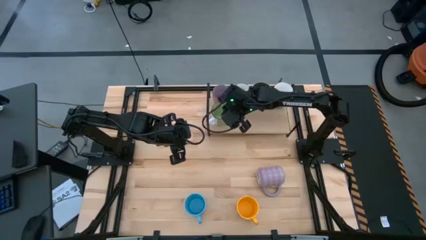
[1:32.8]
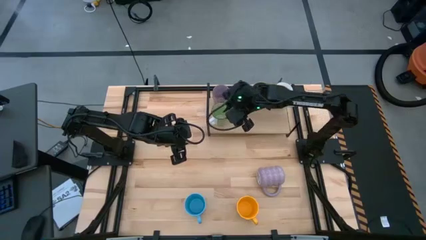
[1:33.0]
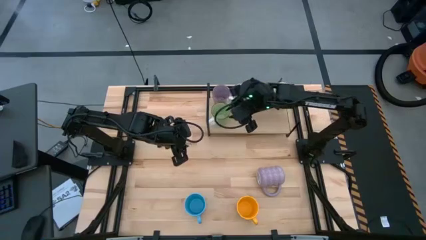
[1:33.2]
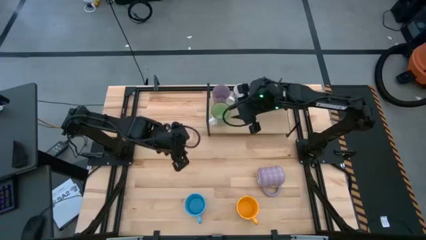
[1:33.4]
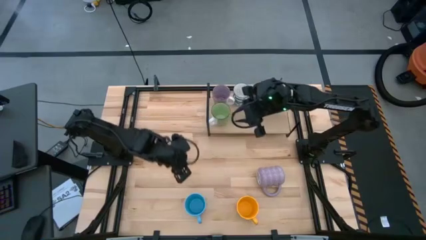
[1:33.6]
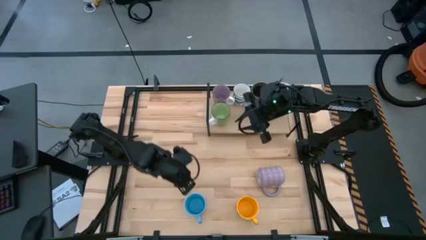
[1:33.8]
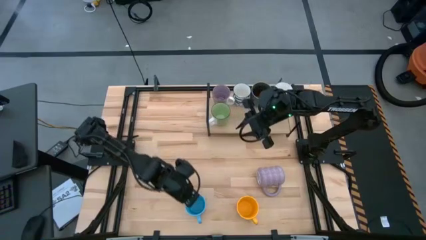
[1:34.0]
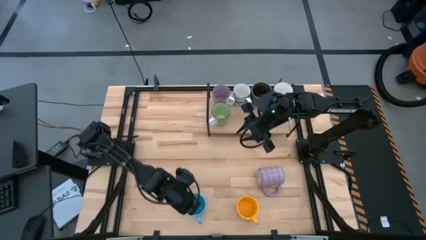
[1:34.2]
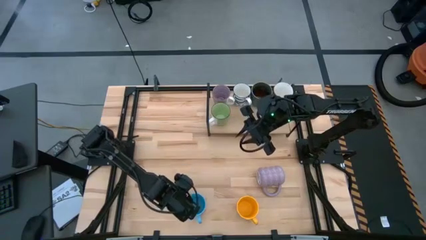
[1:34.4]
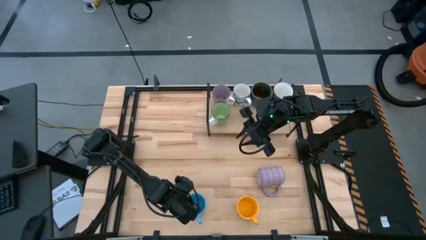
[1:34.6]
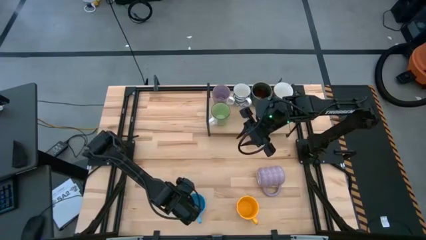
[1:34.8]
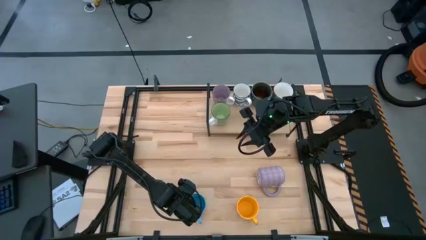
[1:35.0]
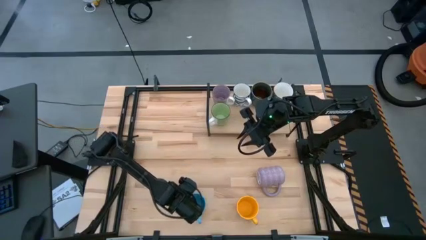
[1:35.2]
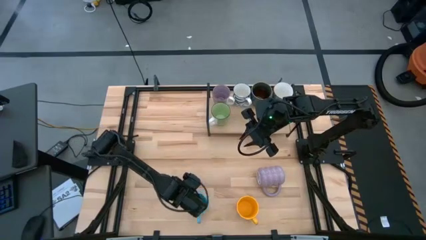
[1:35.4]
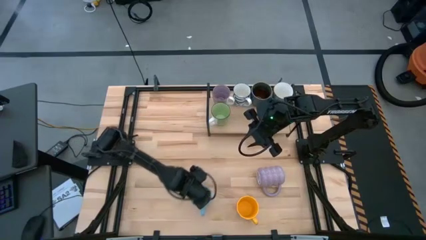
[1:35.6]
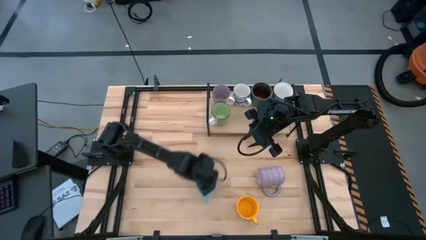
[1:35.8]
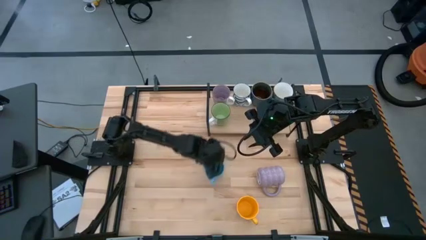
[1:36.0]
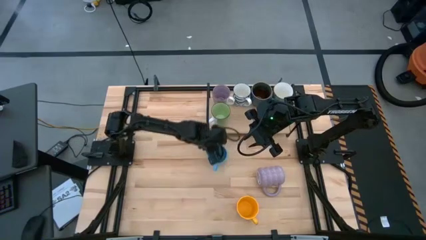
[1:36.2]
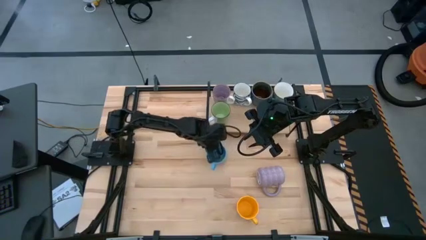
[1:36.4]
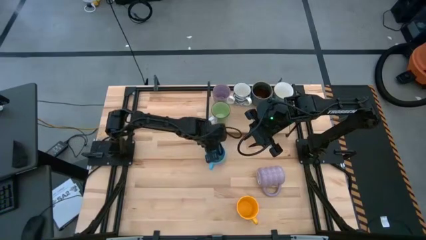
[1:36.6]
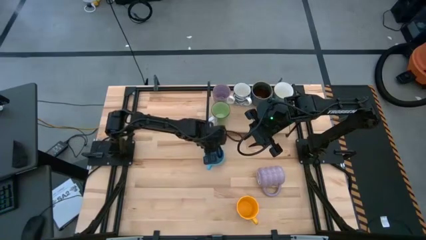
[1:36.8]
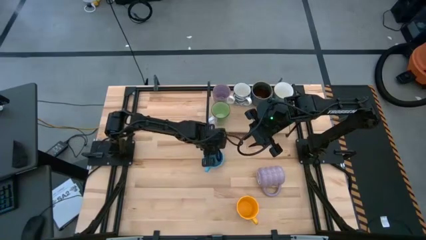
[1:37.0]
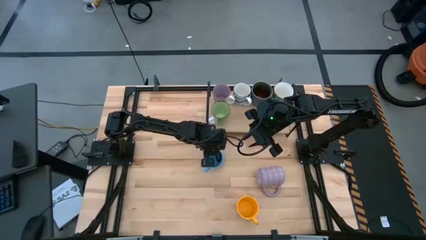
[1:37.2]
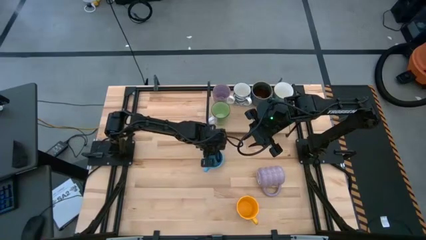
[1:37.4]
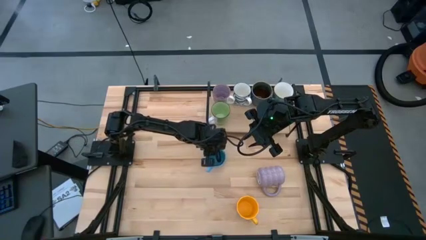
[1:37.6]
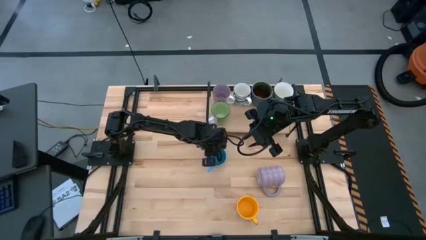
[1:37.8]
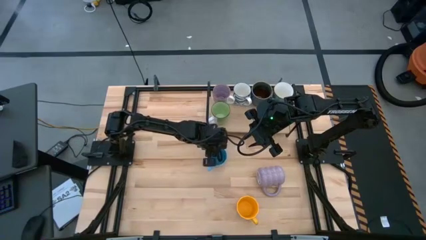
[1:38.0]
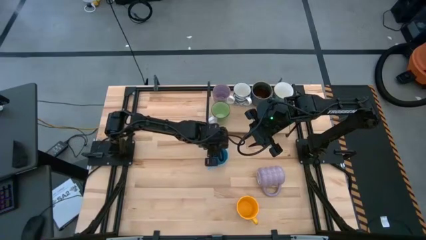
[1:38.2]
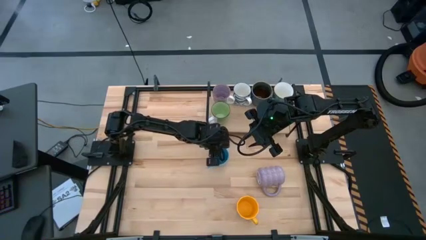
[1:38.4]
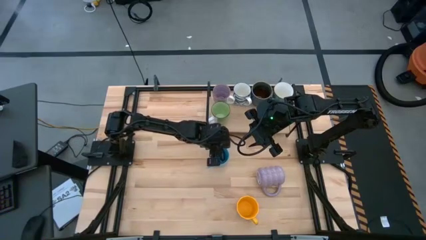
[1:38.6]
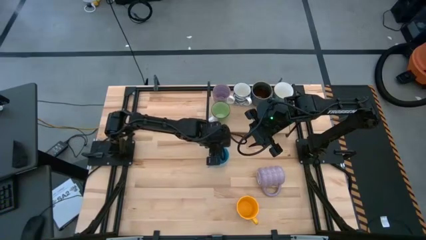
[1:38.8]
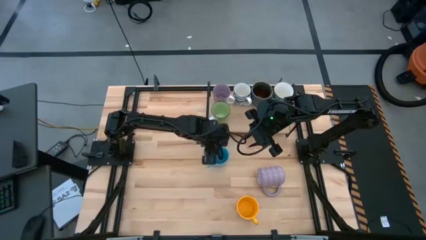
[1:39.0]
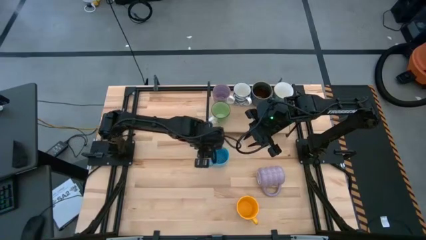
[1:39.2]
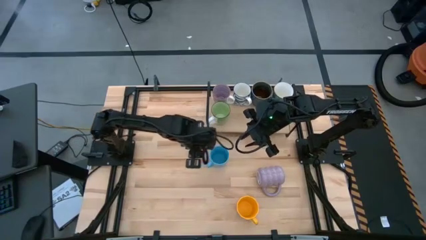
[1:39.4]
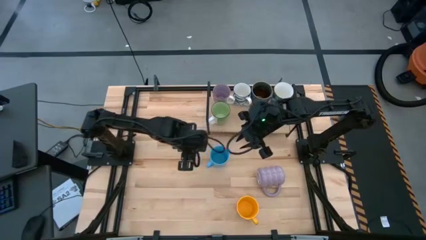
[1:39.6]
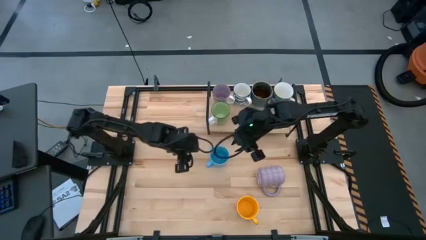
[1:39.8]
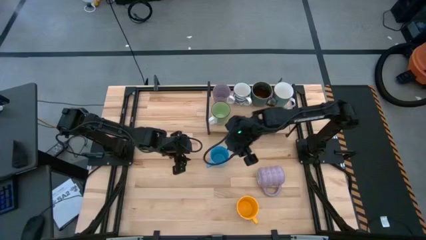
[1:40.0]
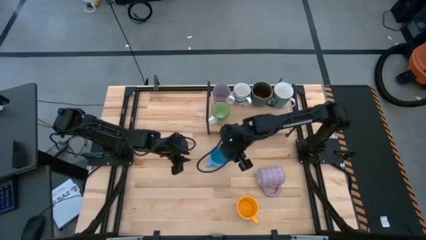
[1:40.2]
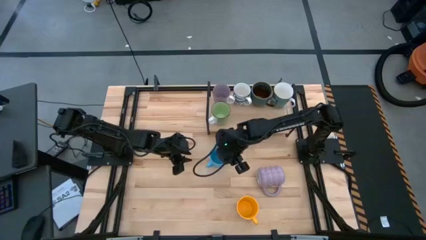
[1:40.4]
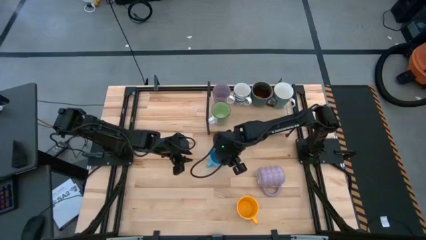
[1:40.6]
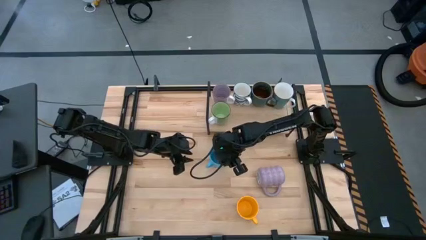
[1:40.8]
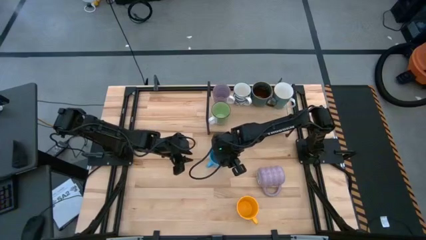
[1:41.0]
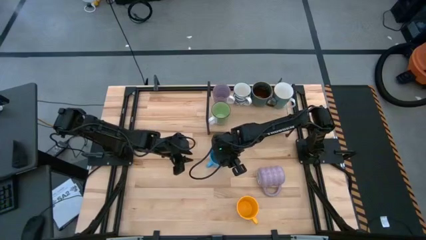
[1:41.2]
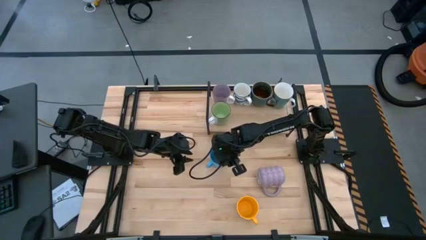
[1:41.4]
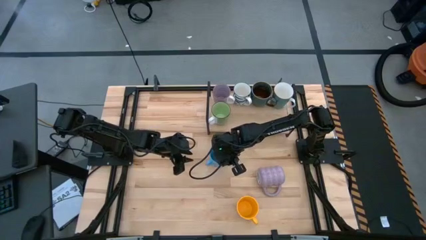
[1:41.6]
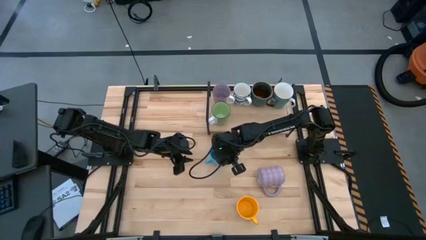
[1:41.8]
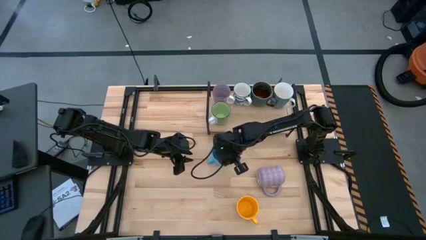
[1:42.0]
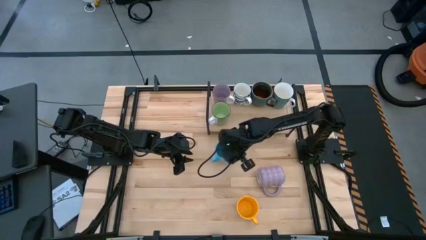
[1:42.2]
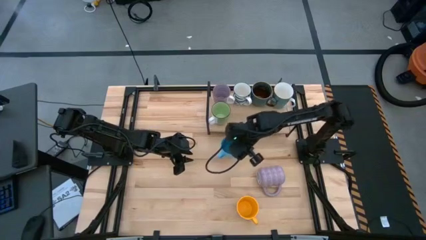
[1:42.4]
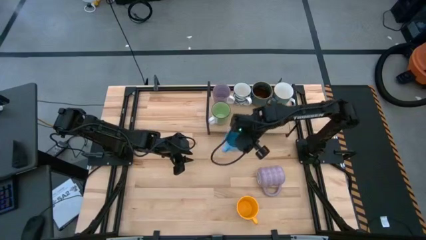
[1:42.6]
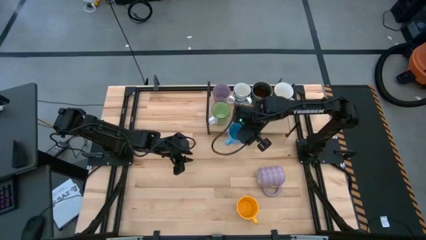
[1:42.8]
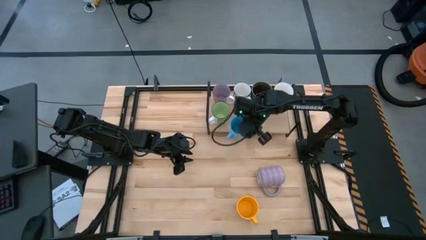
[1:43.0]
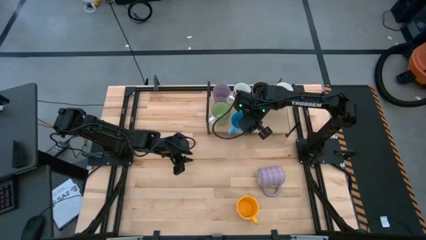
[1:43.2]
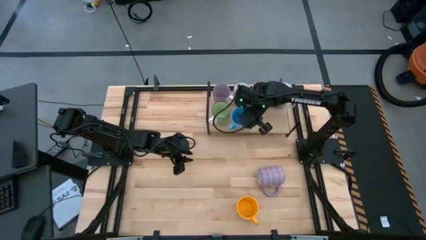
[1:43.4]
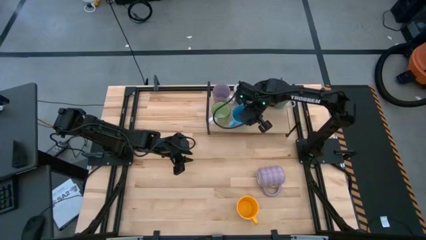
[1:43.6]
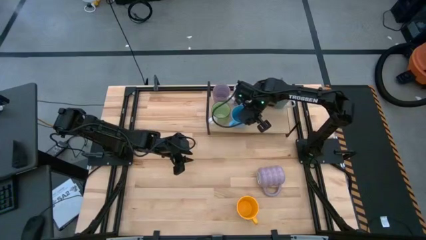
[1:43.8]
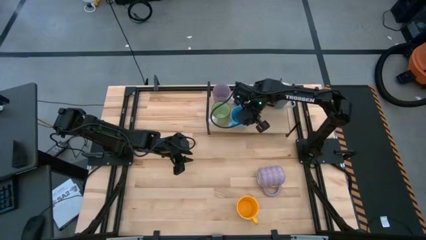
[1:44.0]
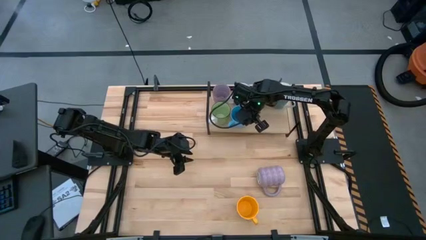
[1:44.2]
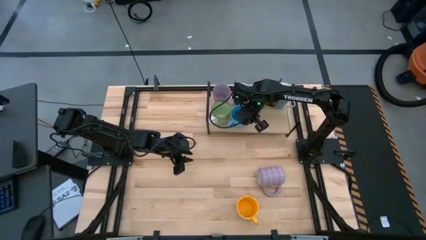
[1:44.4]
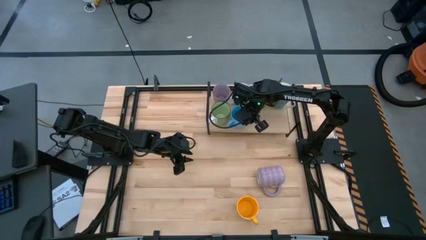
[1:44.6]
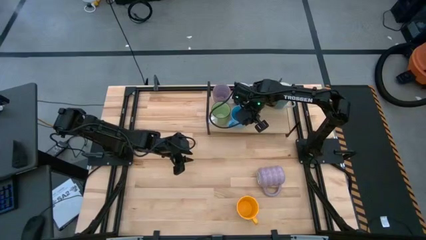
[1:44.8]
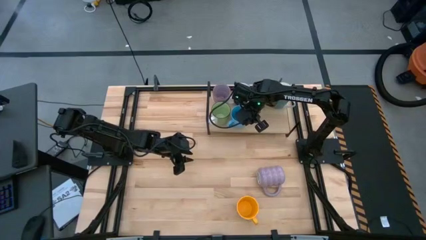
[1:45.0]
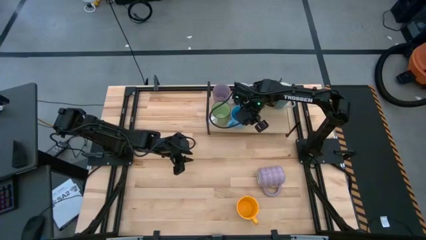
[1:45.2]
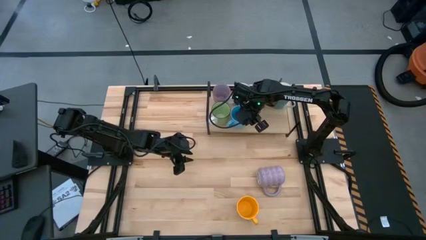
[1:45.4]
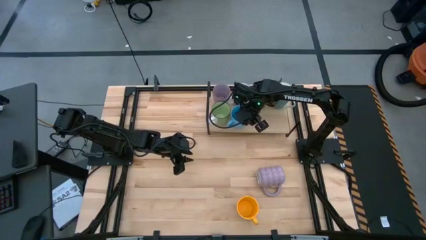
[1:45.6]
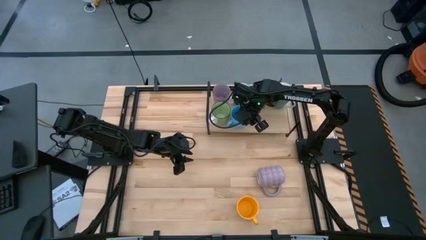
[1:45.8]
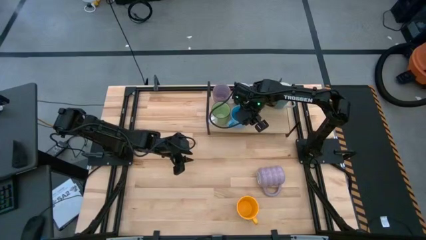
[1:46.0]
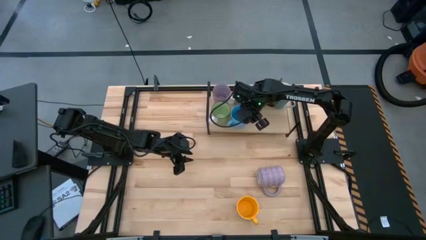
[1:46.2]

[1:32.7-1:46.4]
Task: Place coffee mugs
Put the blue mug on the shelf

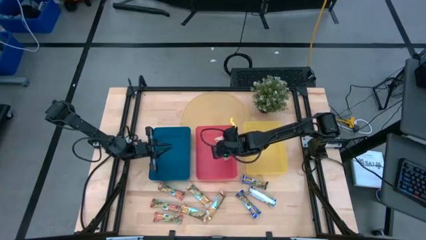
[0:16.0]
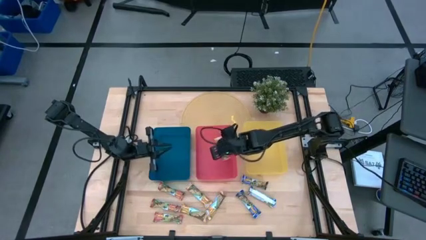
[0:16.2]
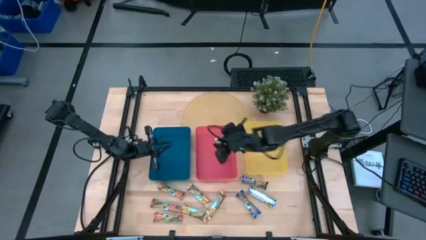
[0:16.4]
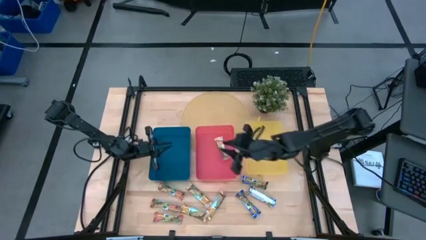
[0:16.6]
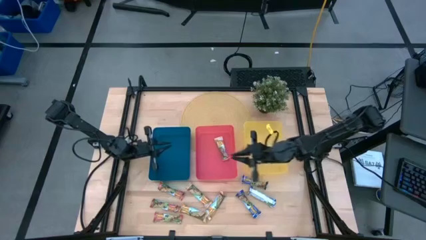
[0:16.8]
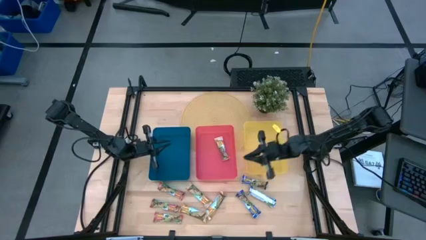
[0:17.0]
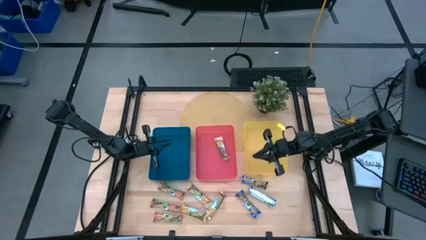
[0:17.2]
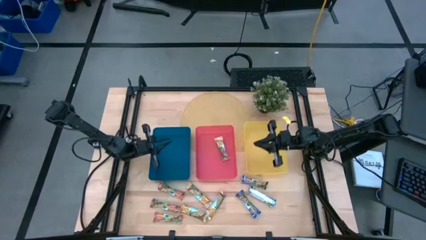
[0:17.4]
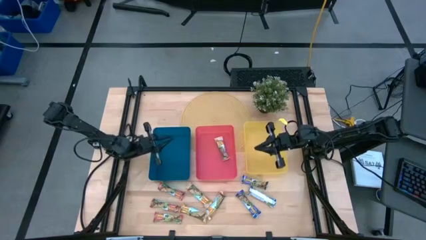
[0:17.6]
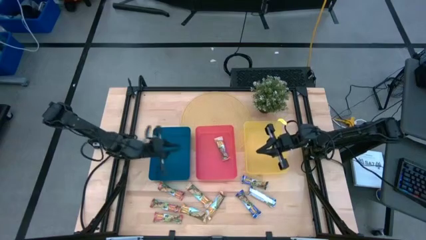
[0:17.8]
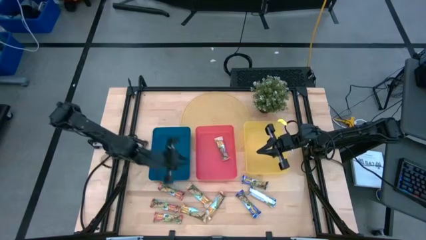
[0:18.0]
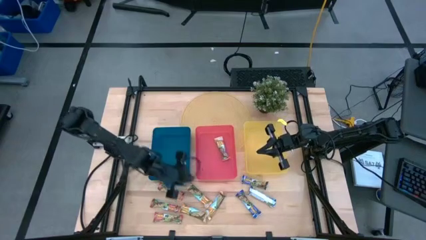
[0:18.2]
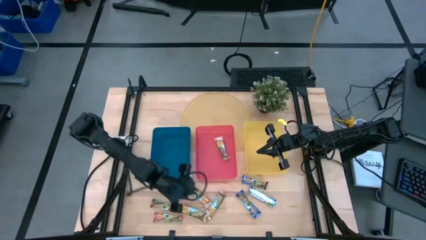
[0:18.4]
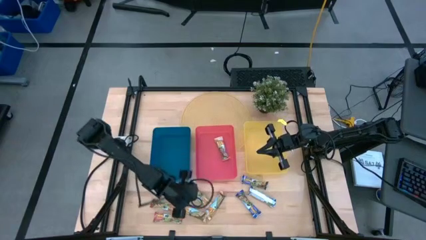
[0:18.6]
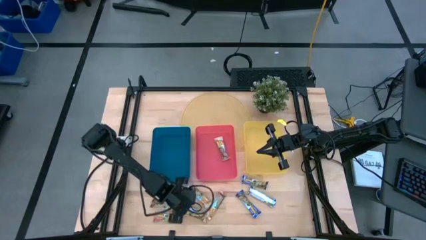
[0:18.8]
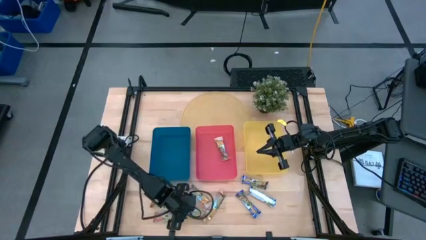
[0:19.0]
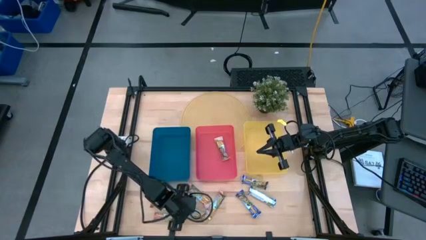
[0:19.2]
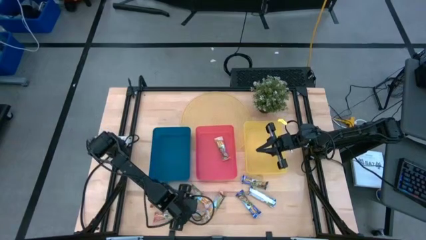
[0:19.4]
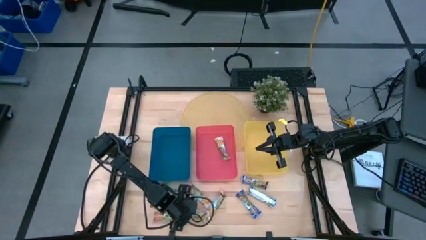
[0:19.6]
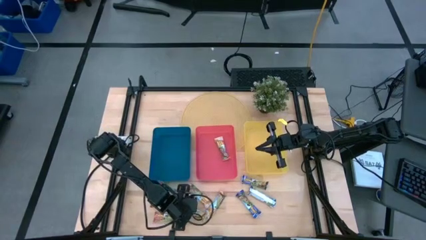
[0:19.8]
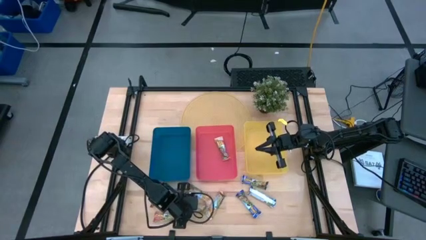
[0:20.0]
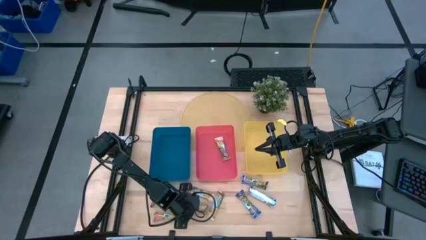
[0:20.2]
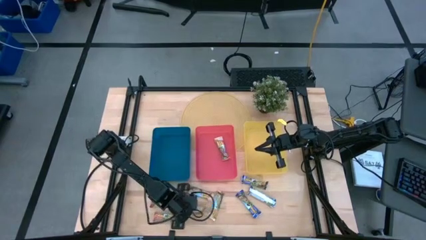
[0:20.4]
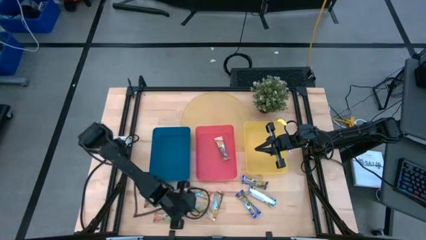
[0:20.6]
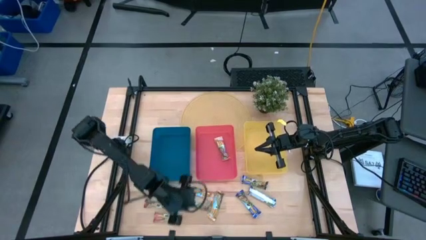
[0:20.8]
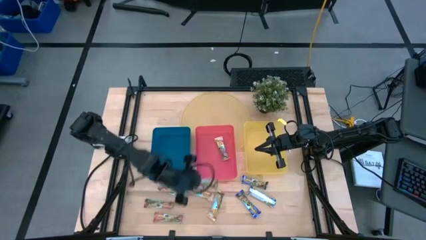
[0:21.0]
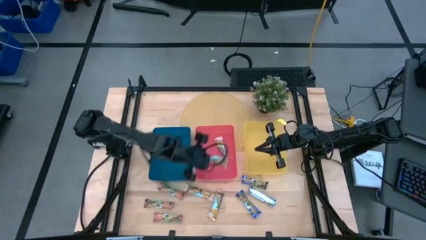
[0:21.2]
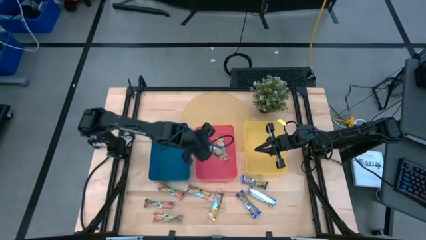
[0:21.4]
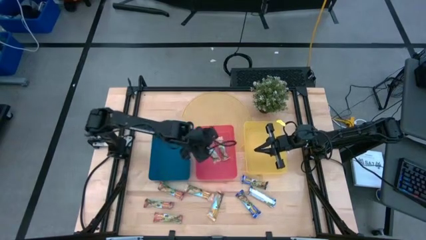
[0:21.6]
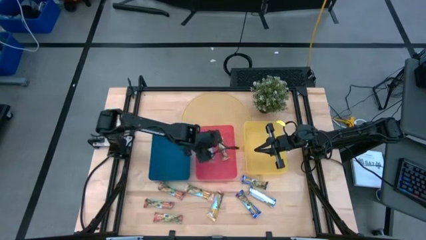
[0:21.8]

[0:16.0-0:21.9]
Task: Pick and place Granola Bars by type
Put the orange granola bar into the red bin
